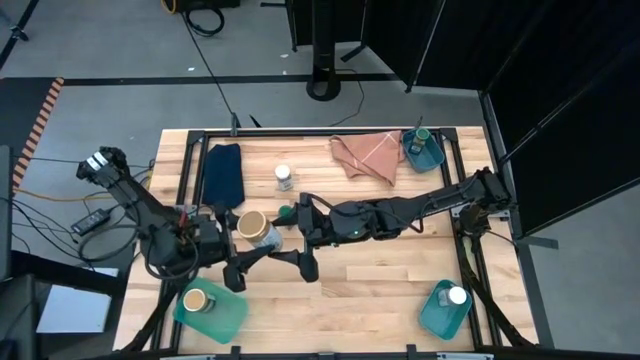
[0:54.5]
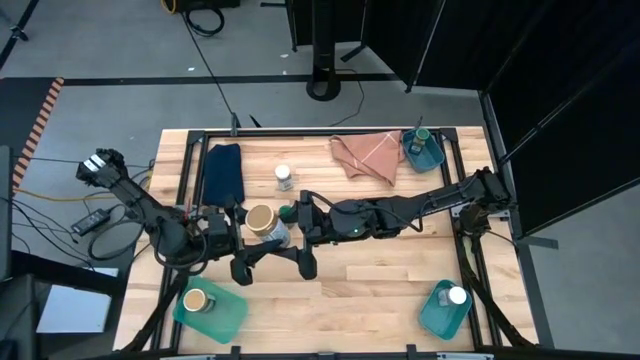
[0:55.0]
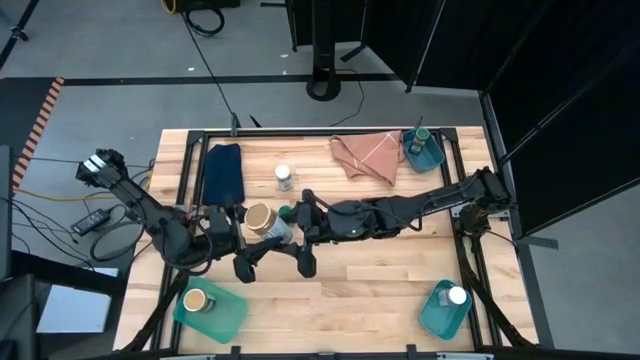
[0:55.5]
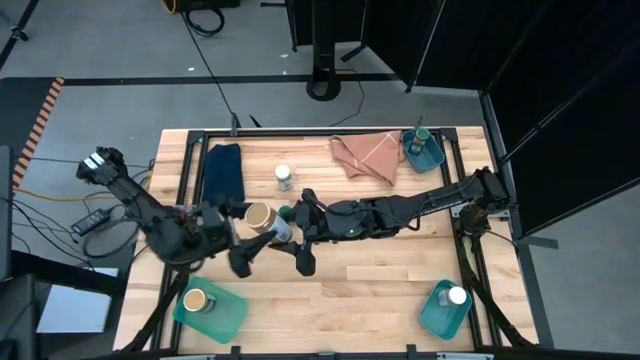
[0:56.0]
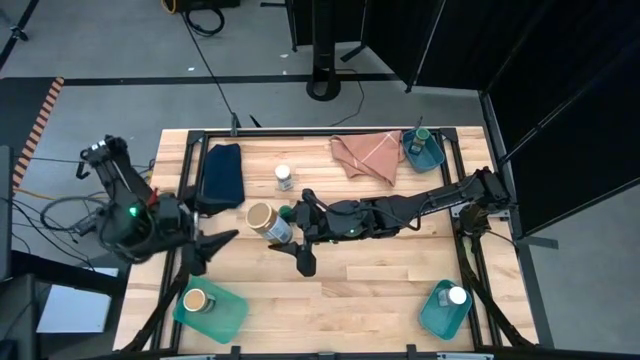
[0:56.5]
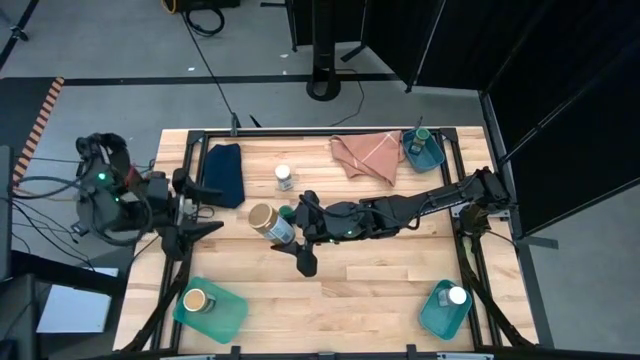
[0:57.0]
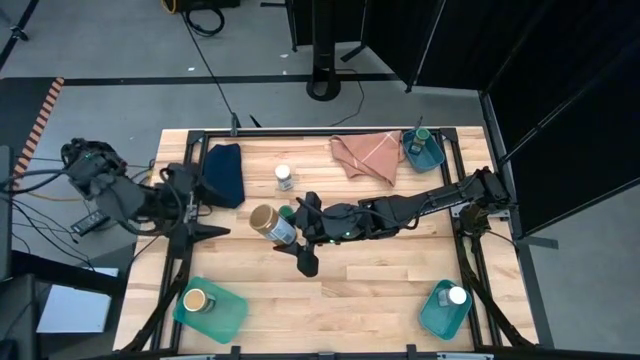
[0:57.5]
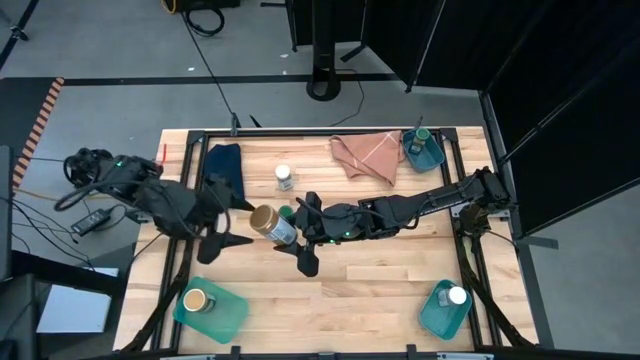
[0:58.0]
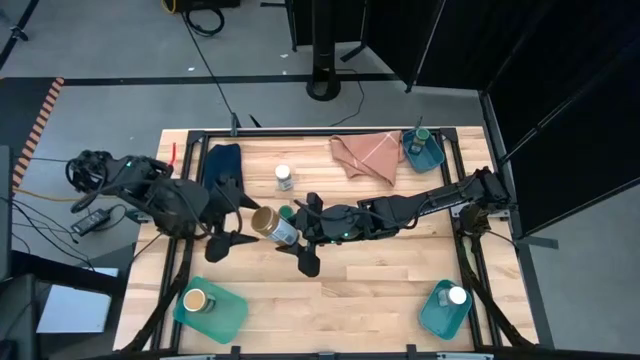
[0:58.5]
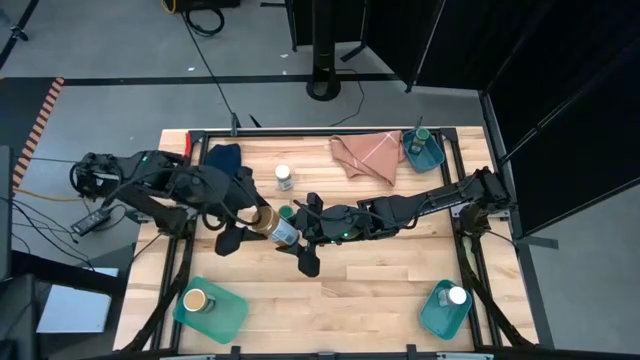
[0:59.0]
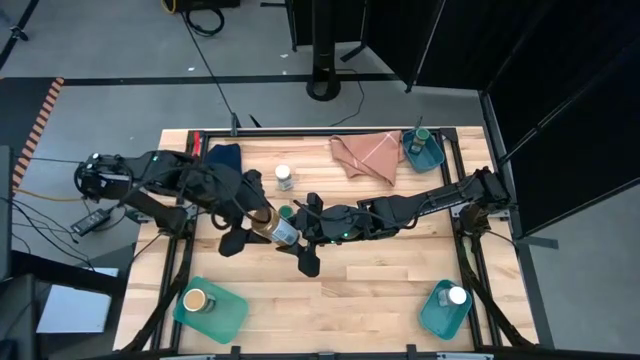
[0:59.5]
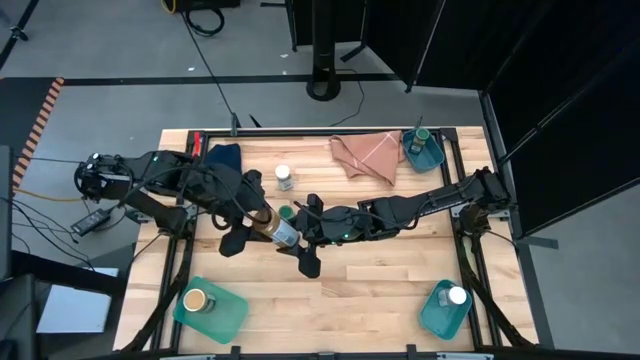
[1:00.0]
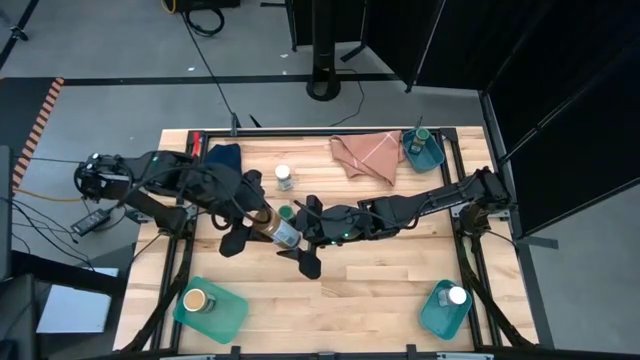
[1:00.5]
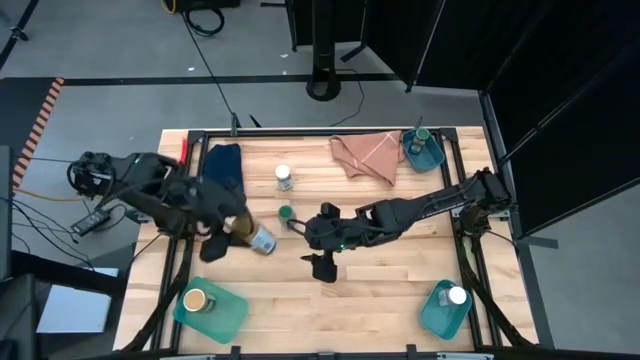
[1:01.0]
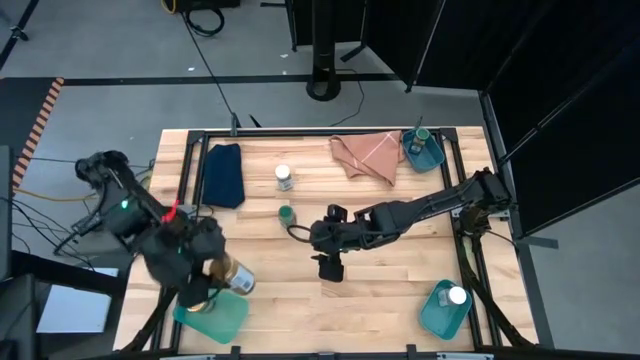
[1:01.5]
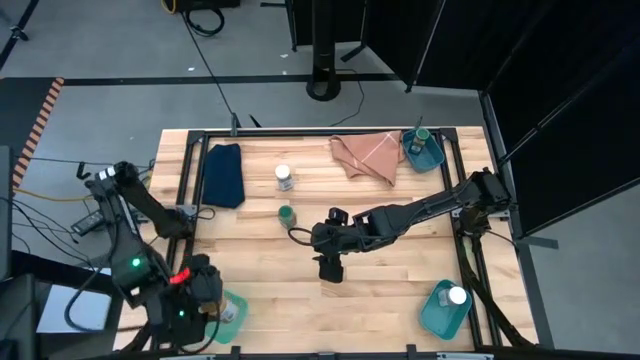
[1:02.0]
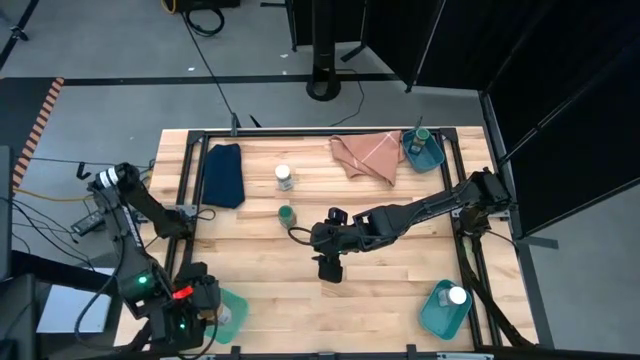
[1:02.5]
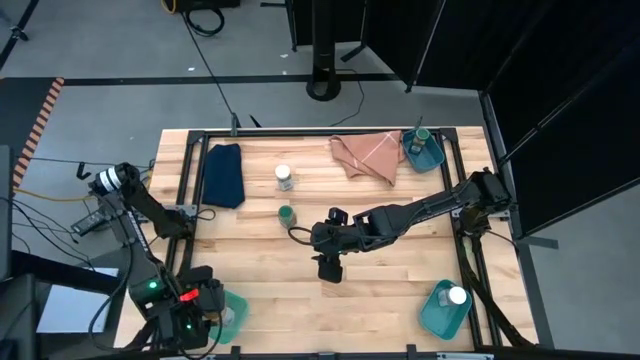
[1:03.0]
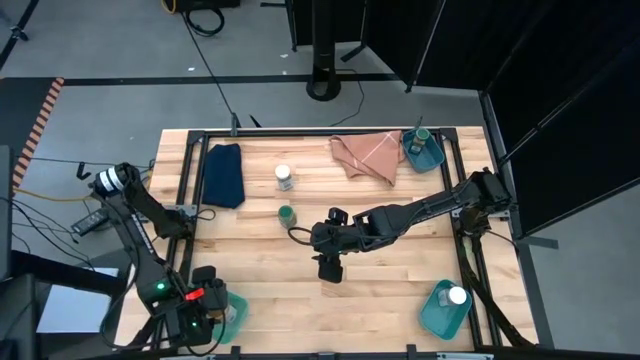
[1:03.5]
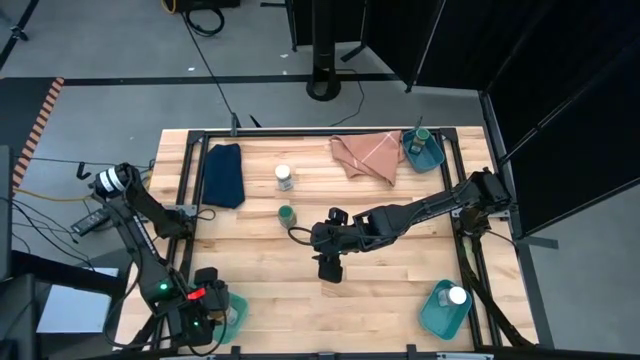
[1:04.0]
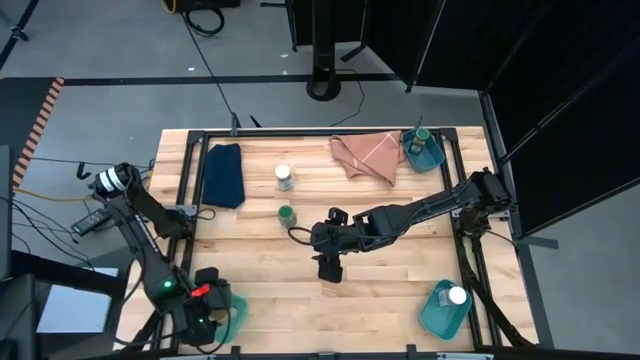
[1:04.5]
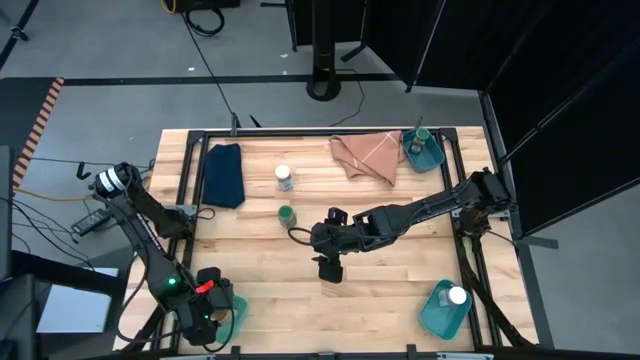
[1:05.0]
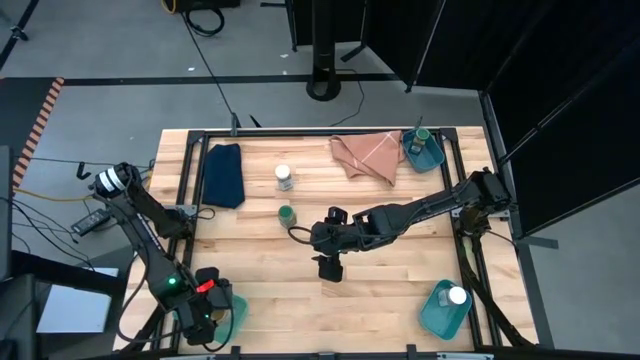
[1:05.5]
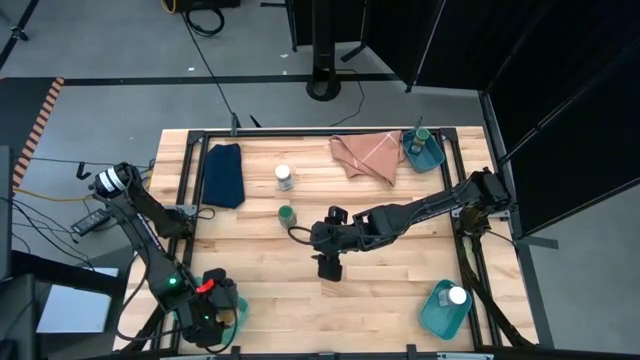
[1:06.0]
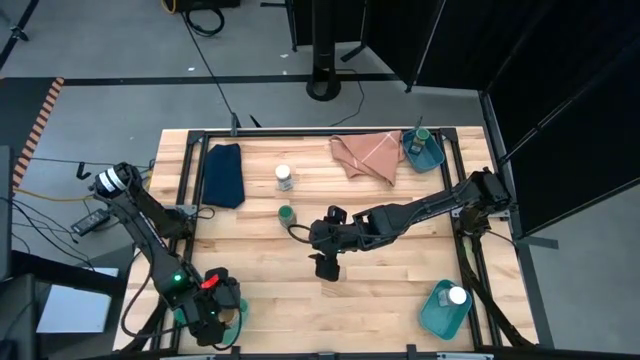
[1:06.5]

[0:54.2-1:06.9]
Task: Sort spices by type
Put the brown seasoning bottle into the green transparent bin
